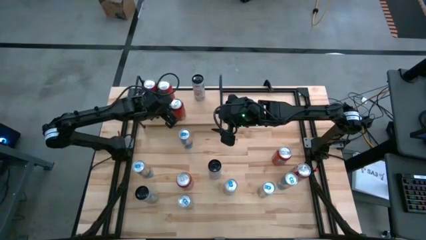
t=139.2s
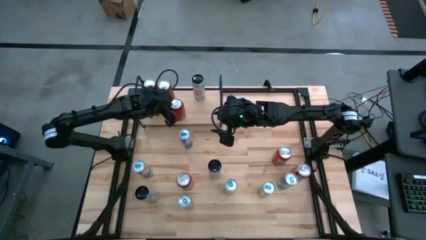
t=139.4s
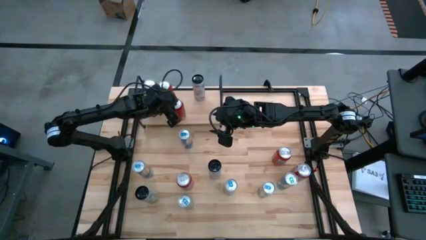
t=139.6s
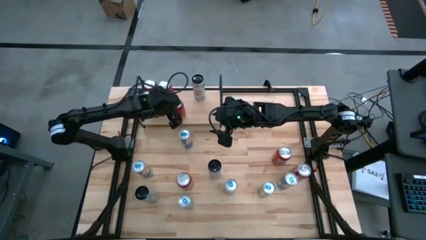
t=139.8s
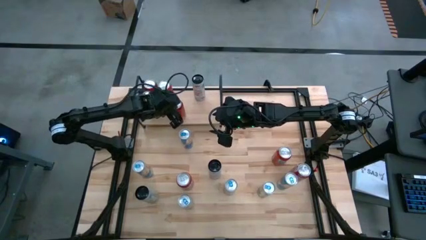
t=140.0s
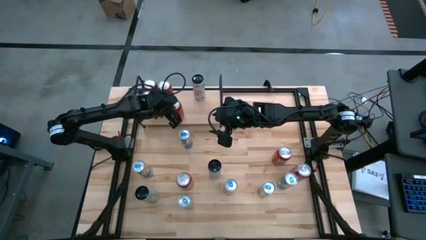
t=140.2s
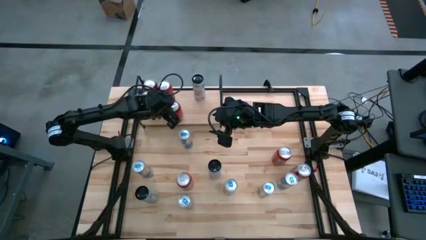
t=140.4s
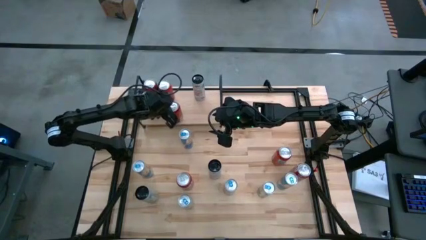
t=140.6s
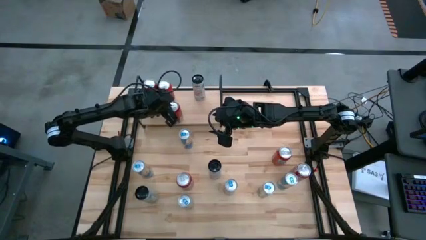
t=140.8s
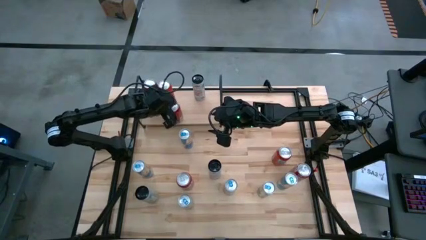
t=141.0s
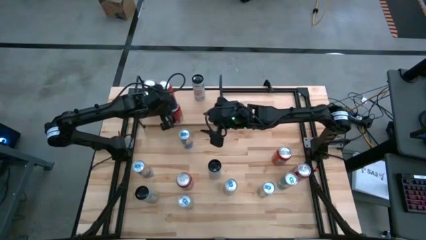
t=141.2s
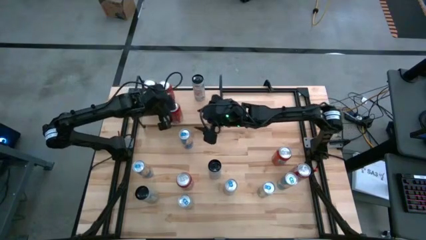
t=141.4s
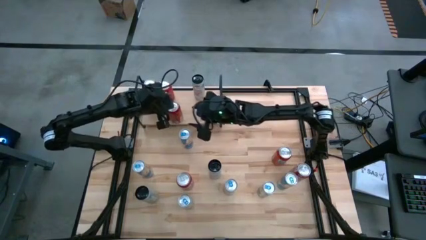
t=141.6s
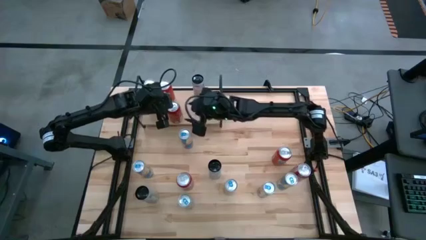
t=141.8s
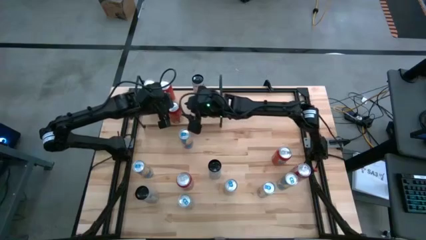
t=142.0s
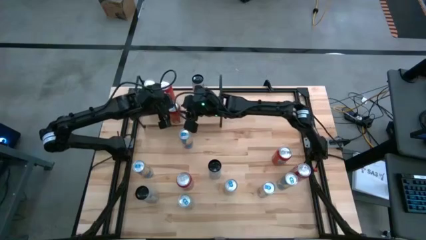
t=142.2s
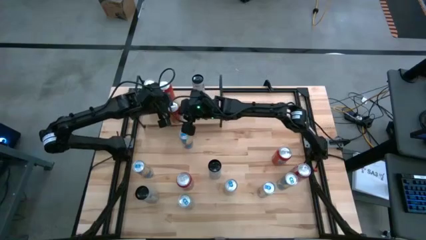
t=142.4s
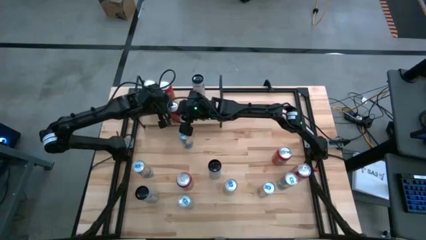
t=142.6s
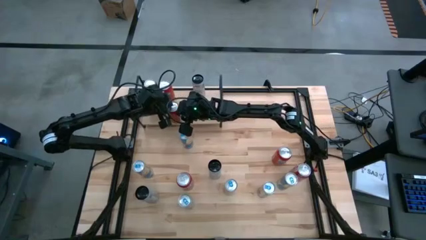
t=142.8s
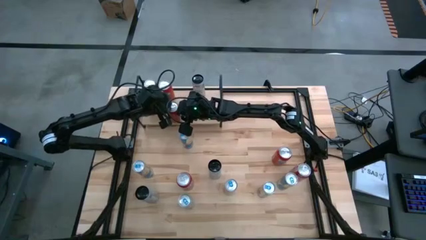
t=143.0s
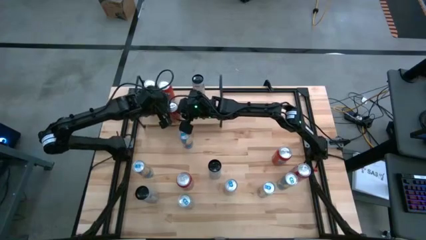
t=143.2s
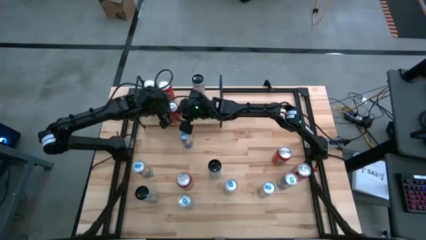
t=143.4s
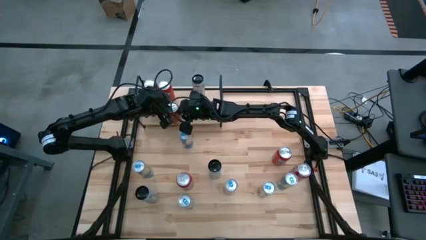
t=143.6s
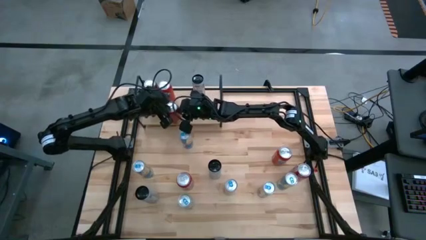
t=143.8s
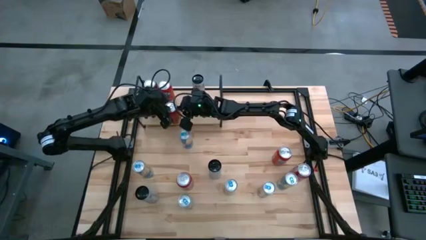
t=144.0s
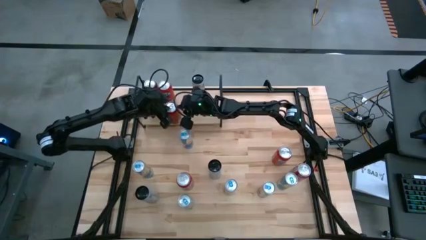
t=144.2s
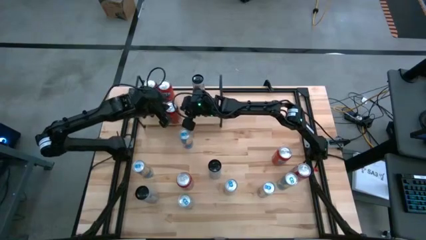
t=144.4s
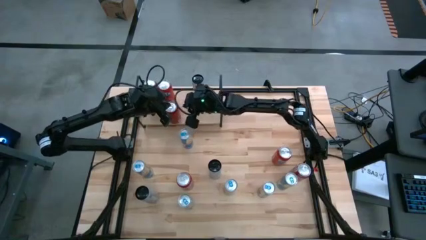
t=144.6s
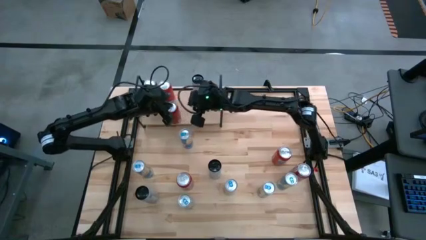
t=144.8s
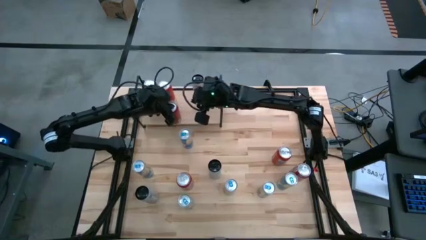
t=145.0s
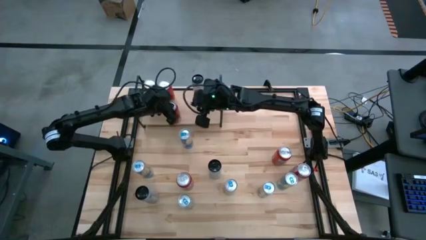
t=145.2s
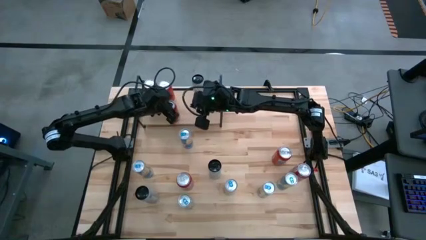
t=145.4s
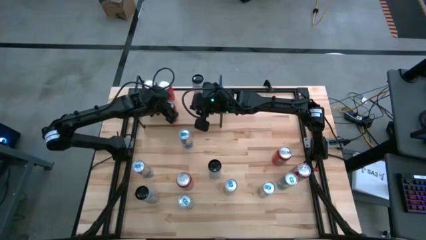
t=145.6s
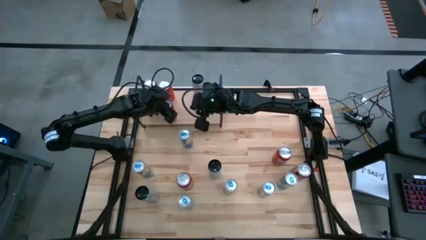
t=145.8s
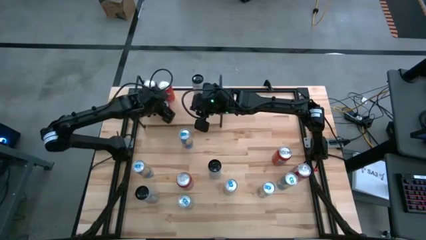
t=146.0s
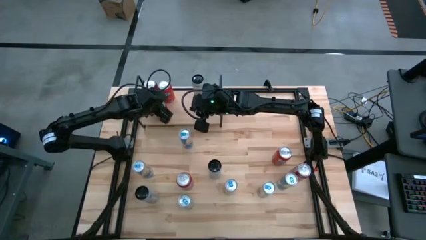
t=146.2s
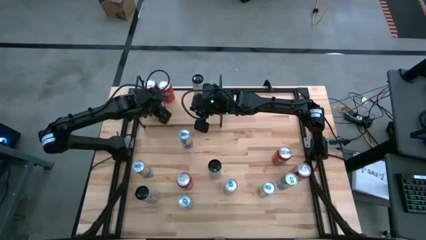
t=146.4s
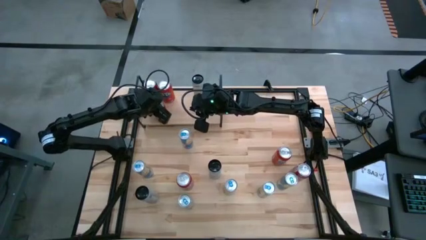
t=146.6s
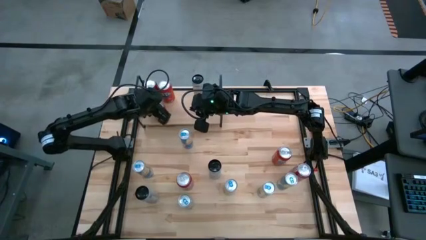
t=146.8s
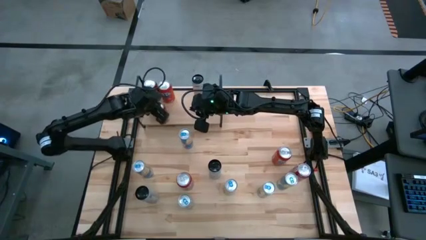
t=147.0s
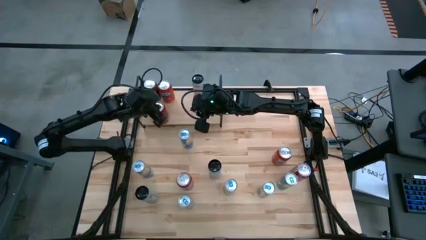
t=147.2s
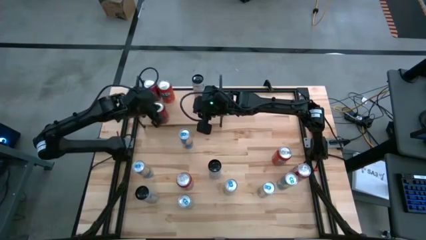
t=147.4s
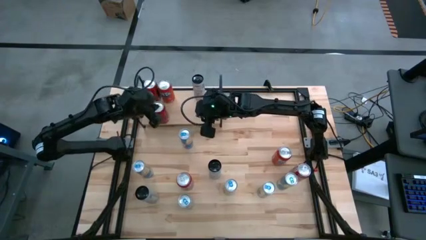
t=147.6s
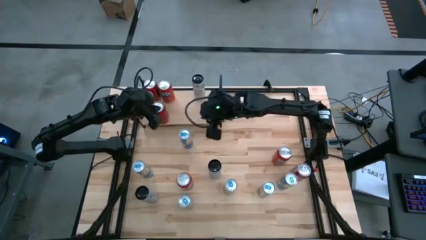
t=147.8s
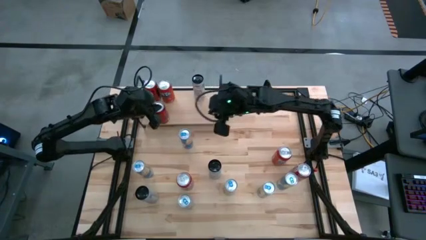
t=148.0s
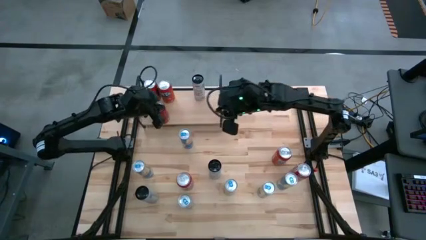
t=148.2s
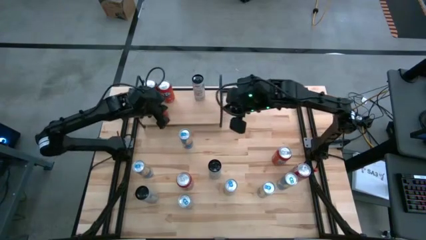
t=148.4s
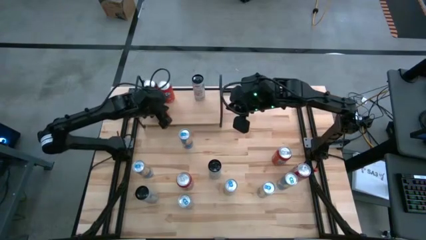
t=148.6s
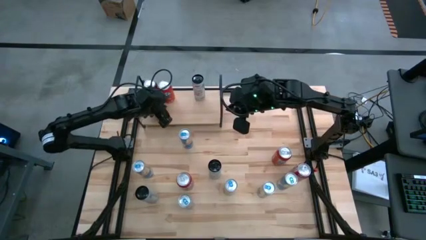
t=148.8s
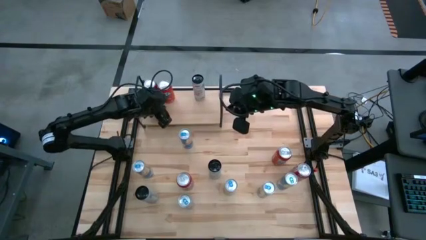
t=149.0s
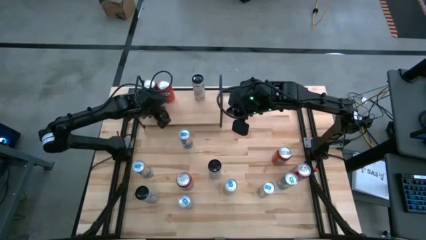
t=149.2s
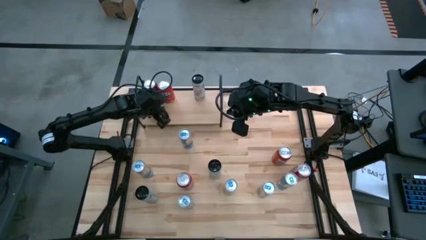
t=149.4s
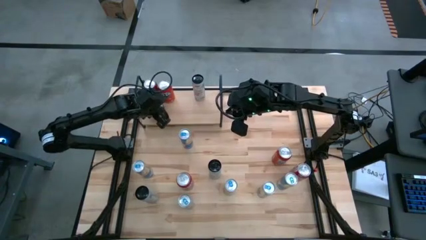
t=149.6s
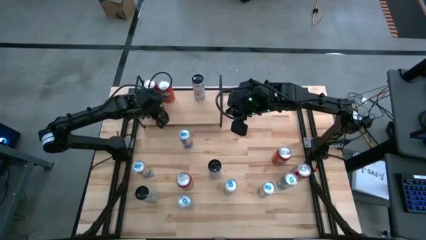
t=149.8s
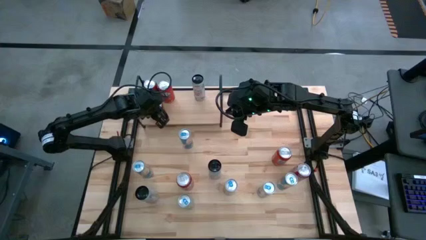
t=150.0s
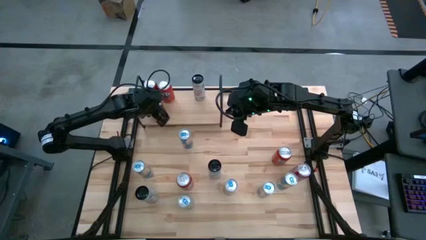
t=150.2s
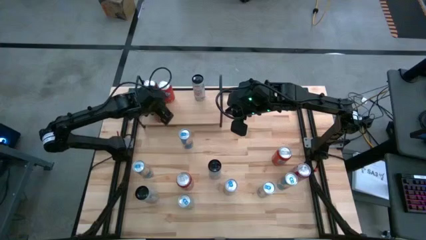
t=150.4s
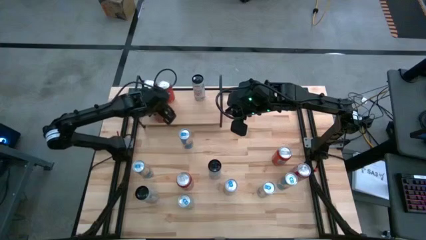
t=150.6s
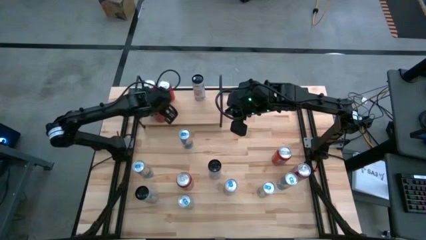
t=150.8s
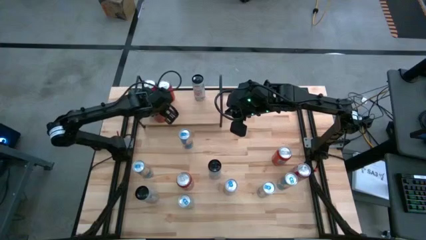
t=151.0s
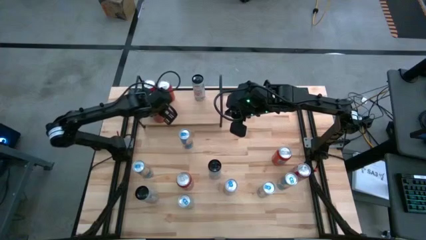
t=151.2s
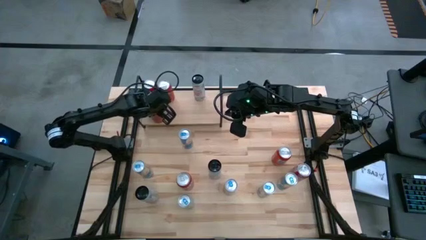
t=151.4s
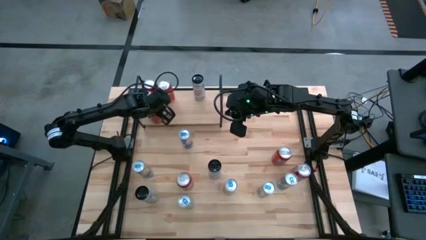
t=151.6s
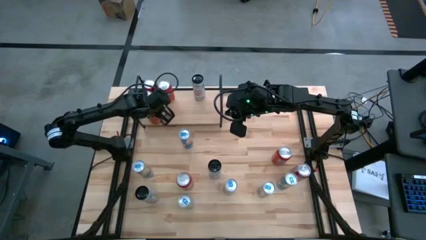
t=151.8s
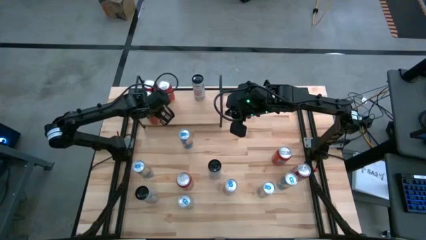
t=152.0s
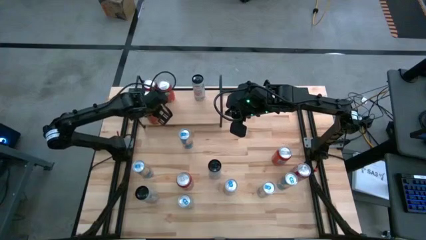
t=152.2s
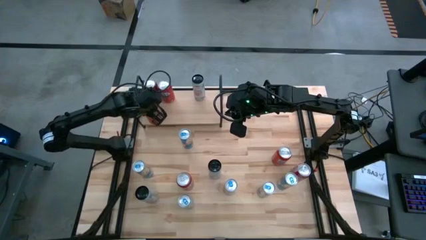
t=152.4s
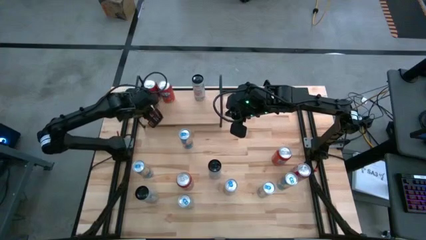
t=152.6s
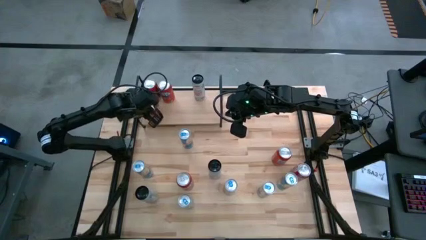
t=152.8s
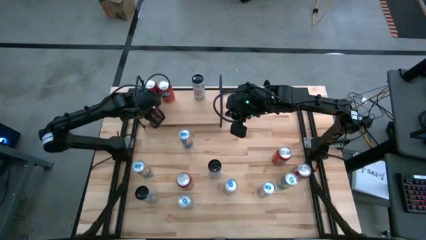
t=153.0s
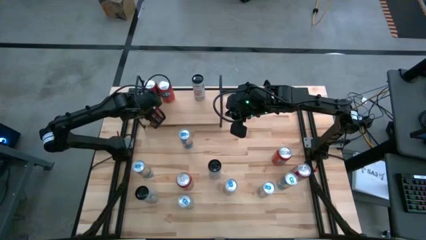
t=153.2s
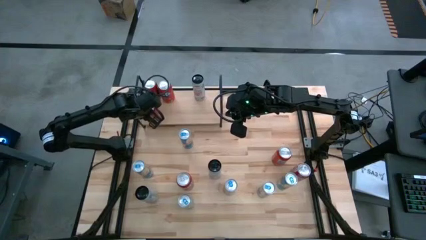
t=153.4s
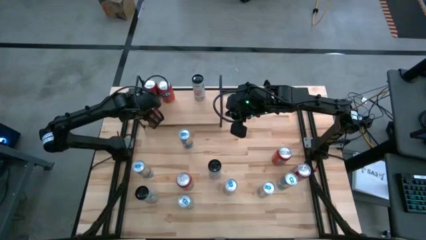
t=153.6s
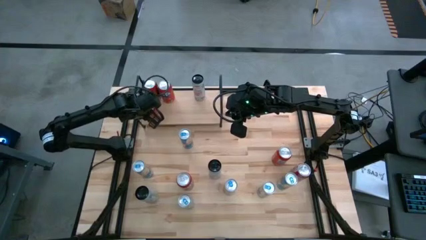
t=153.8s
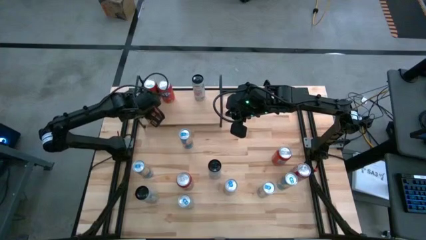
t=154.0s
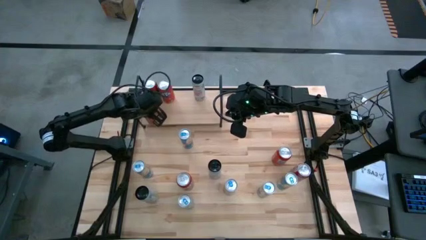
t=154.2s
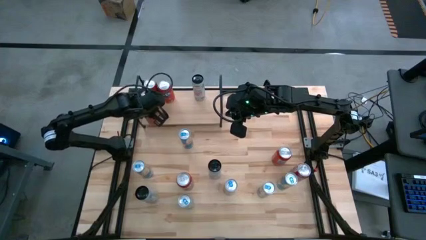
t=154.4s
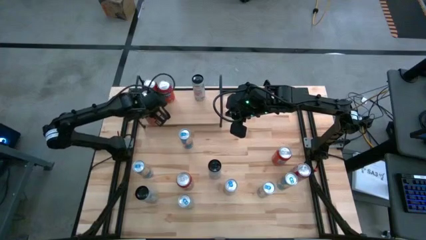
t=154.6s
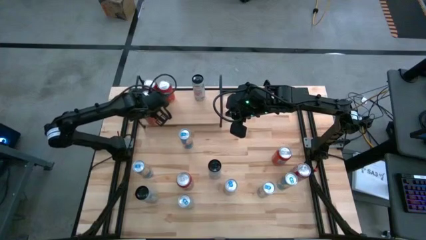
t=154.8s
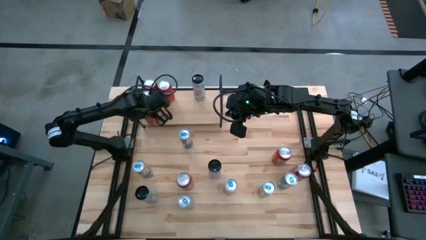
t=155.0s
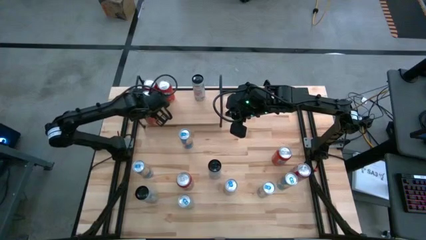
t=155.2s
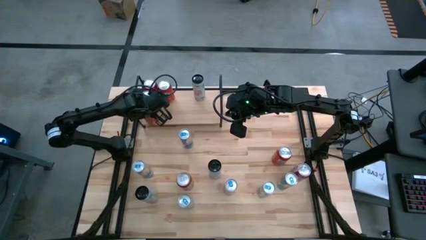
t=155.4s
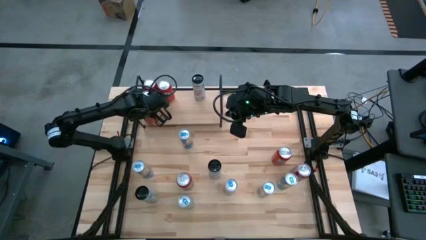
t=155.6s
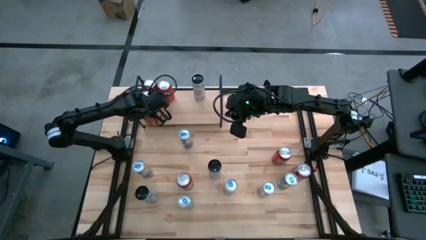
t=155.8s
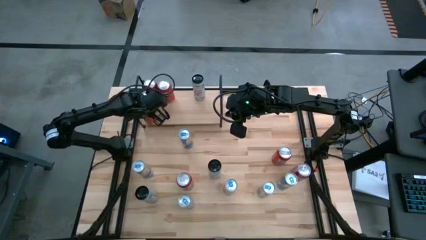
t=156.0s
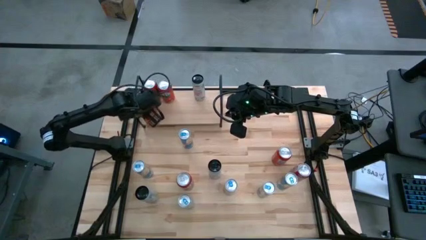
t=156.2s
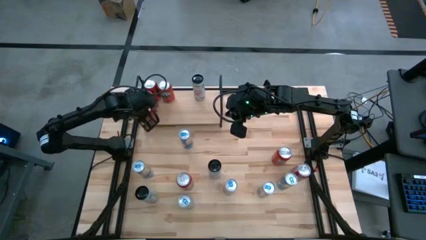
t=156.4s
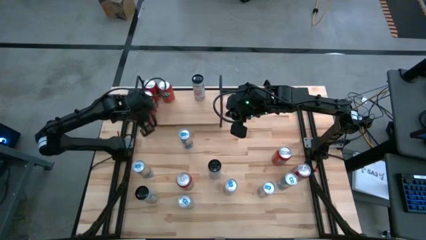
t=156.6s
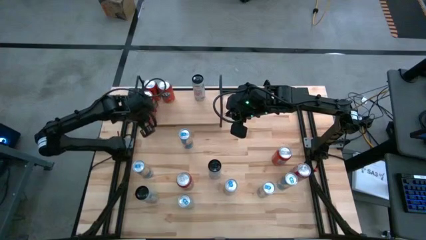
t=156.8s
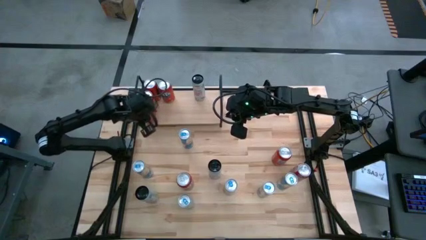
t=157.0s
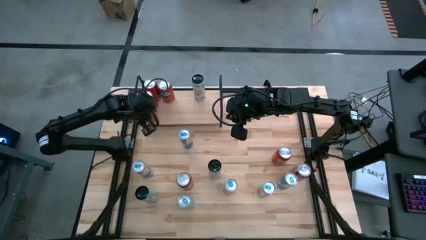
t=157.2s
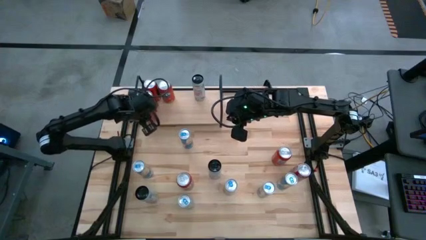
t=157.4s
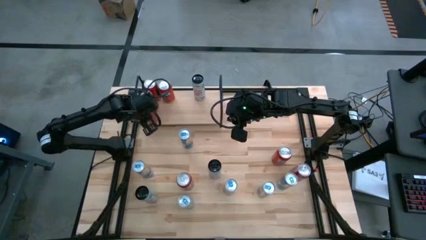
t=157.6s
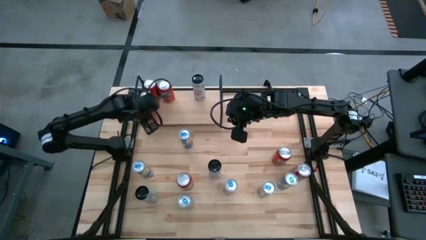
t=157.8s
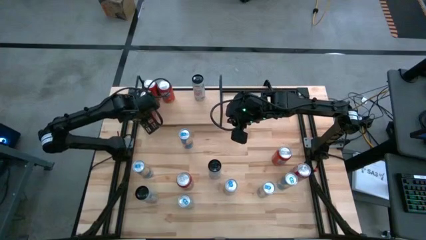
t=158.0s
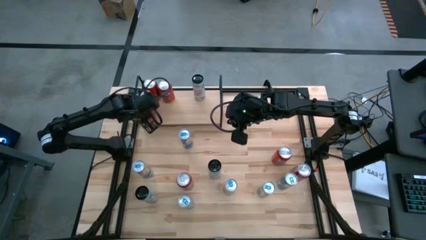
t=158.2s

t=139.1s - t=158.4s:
Task: Place canned beverage on shelf
Put the red and black soda can on the shelf aligned with the other red and black soda can
